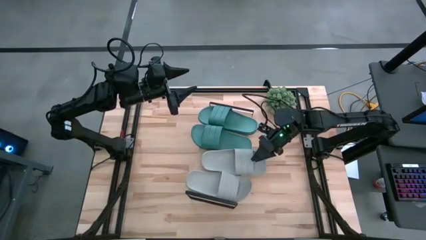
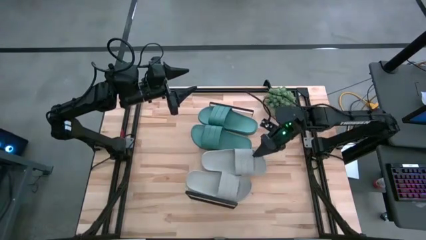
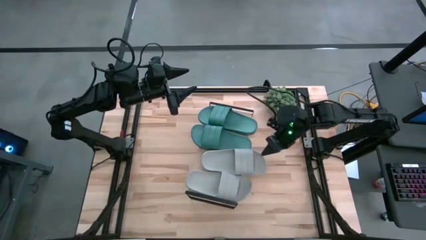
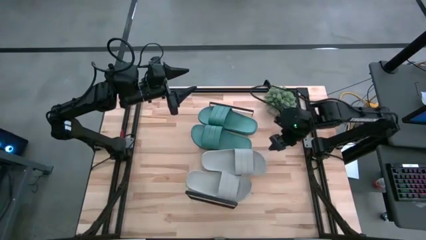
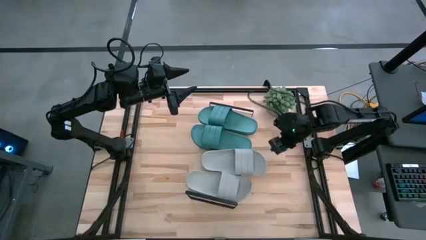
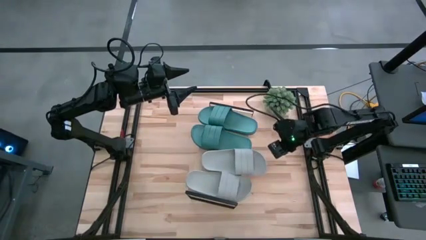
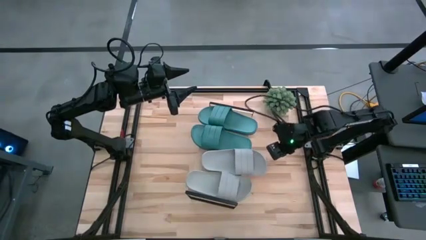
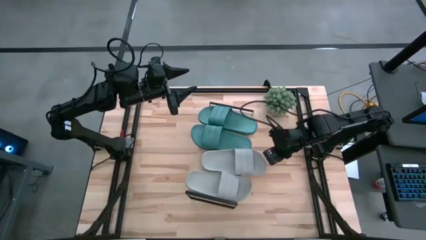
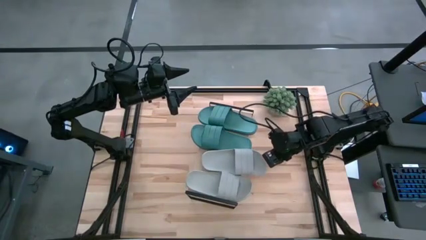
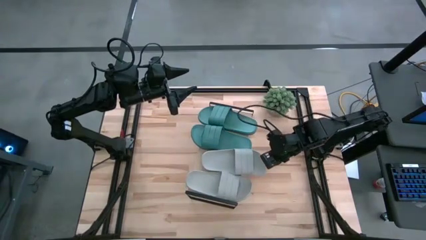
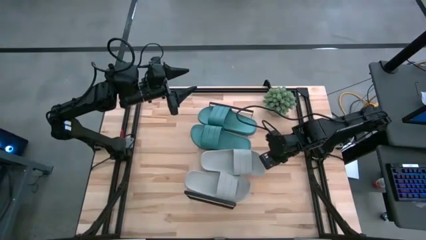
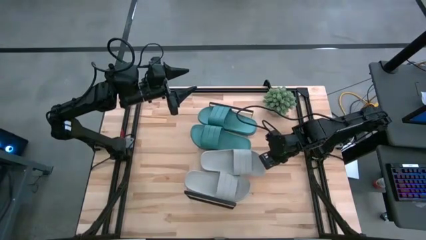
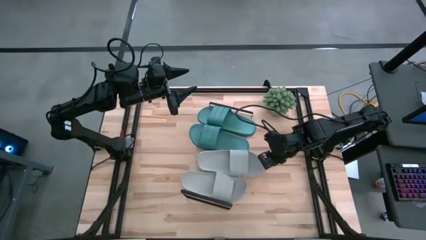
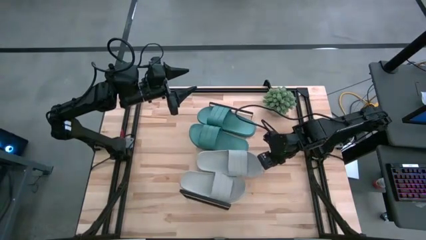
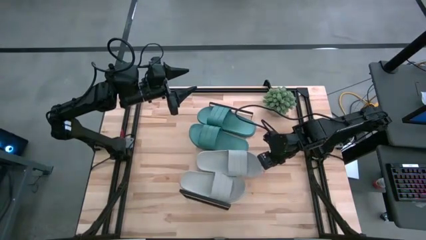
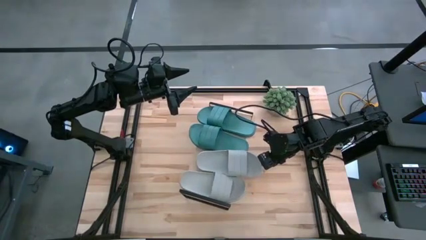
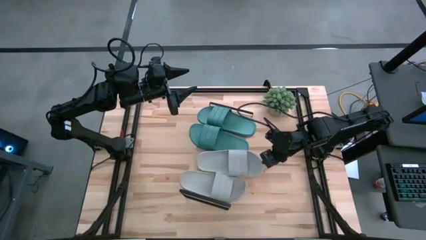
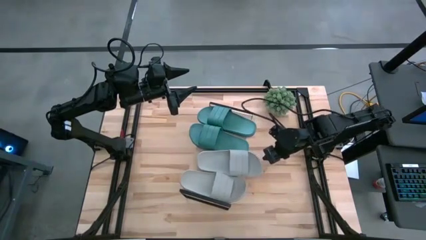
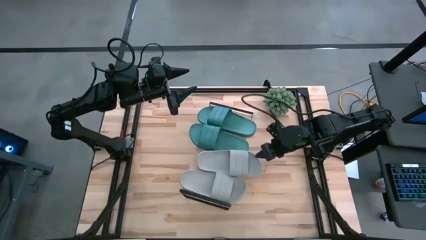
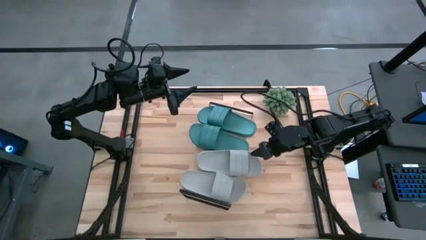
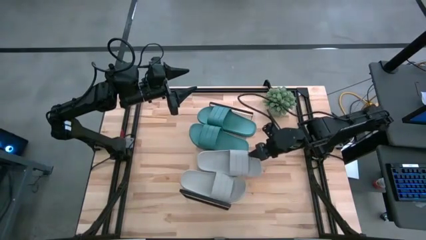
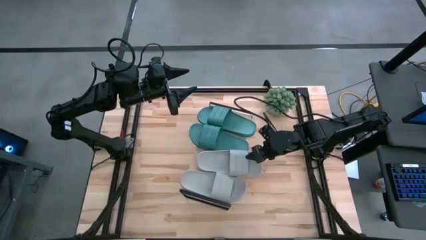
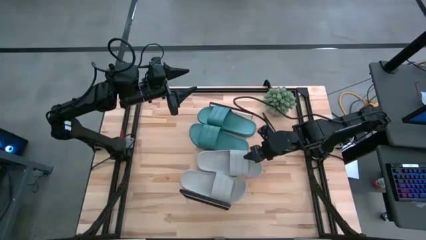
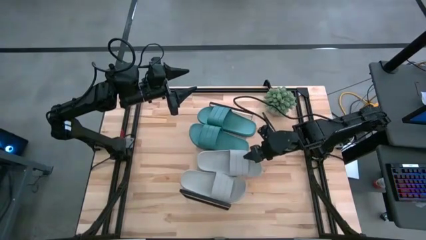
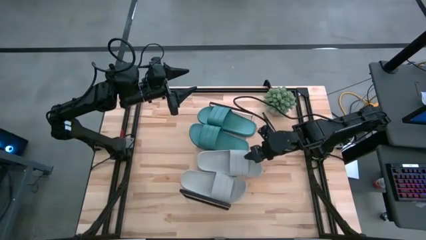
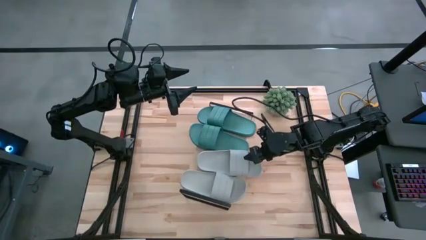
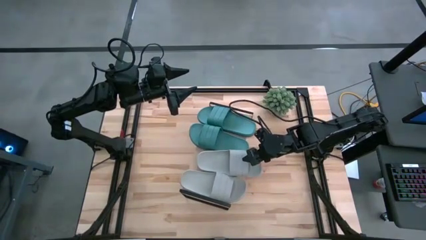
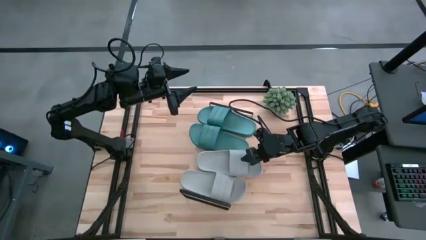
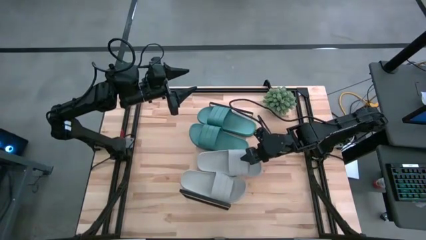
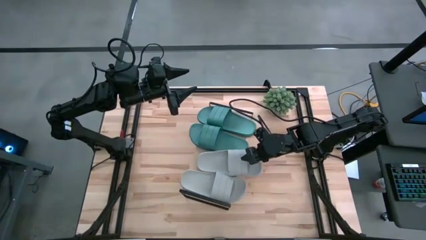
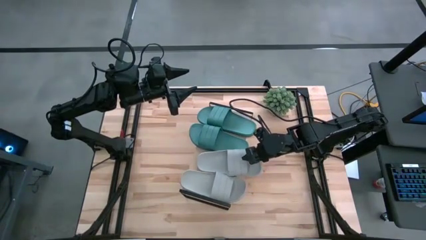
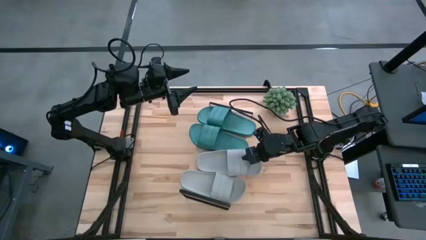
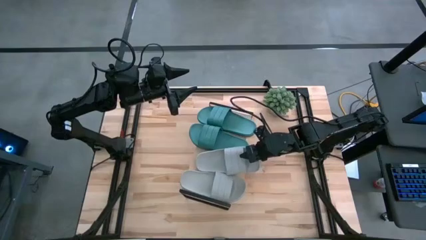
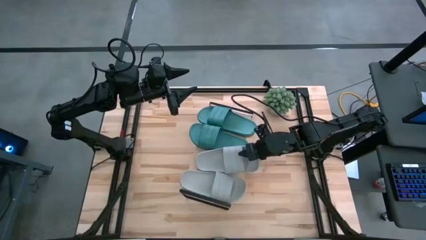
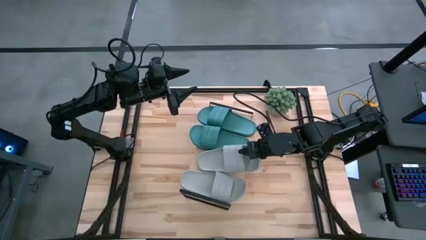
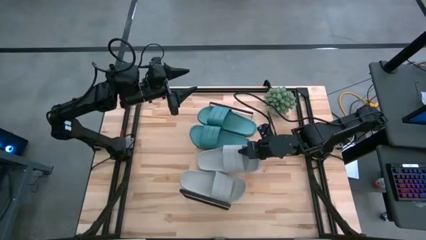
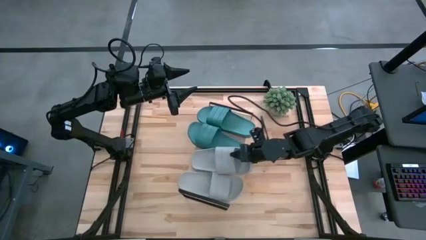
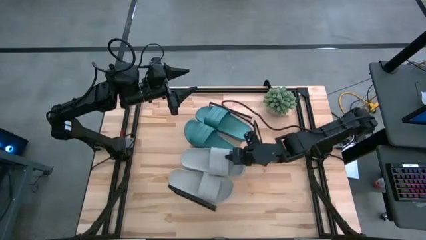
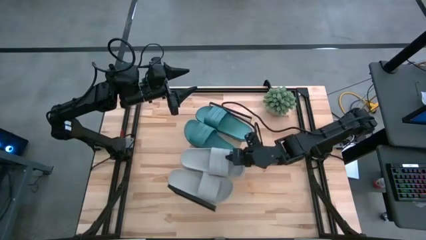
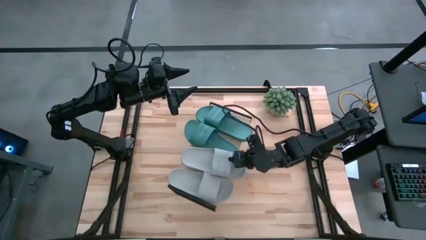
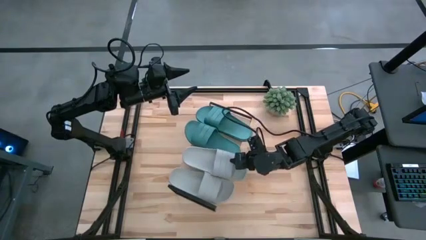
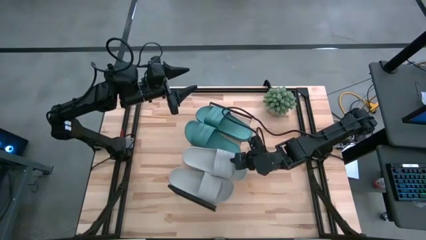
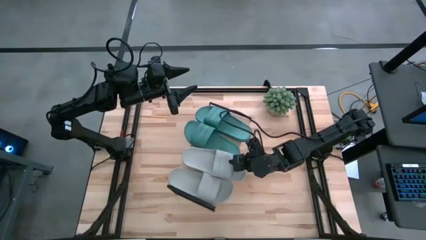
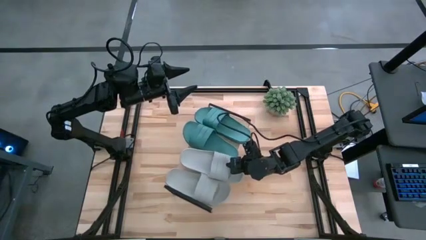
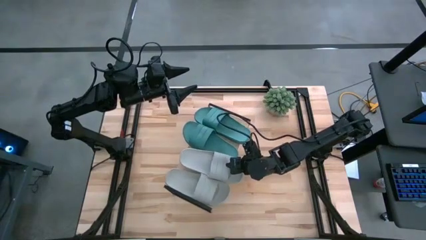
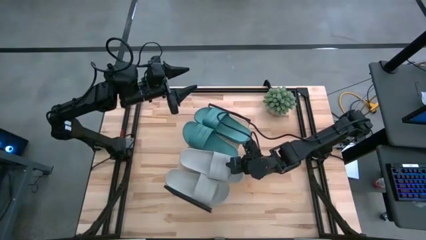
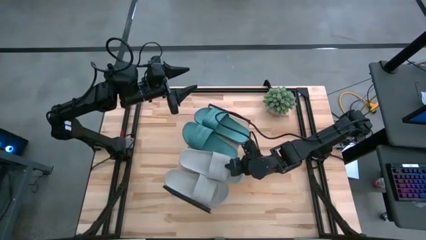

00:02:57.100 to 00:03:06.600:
Task: Pick and place slides into the shelf
Adjust the top gray slide on the shelf

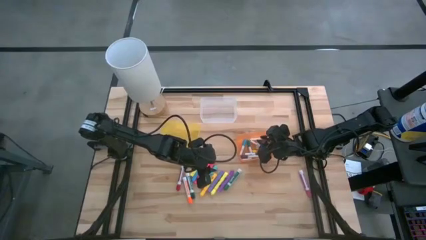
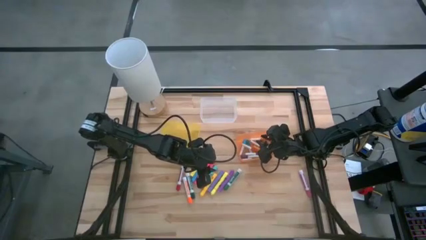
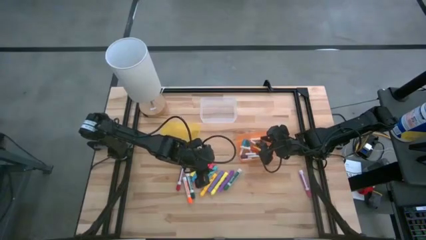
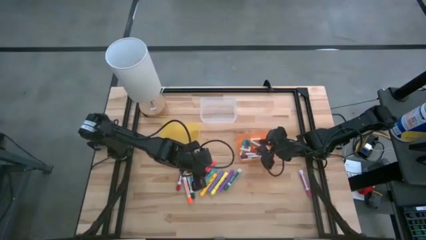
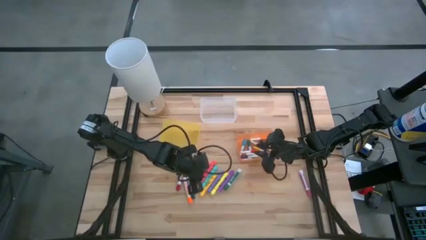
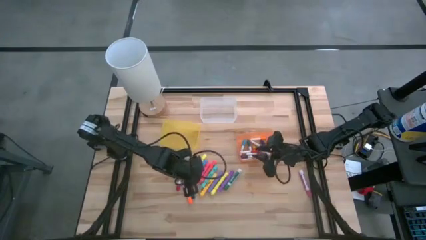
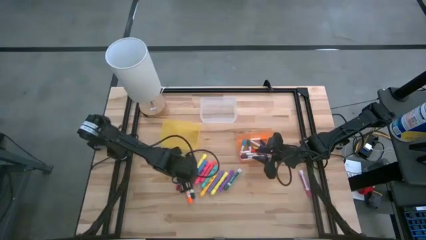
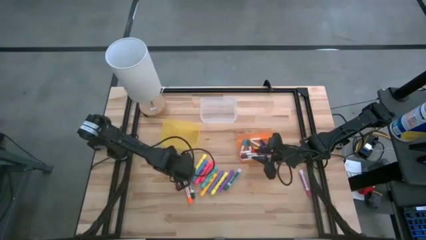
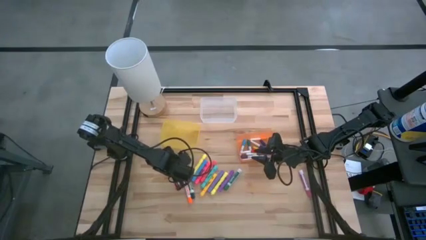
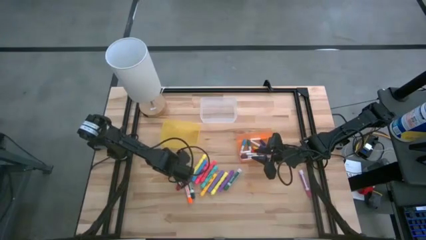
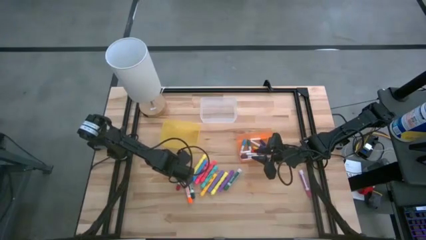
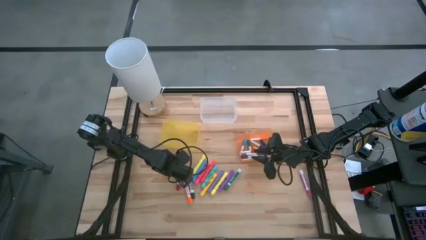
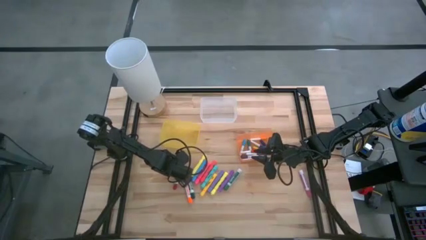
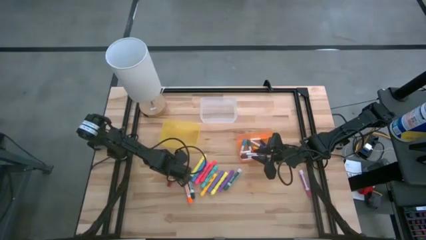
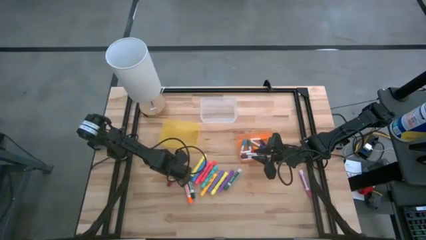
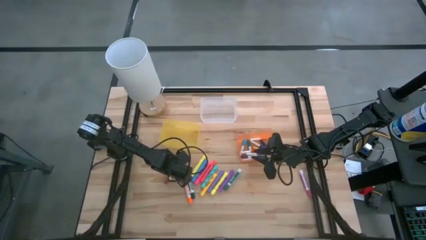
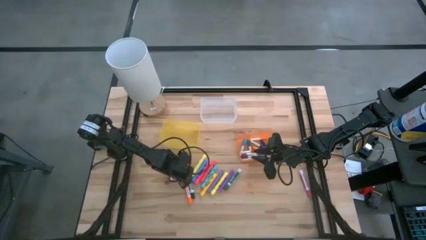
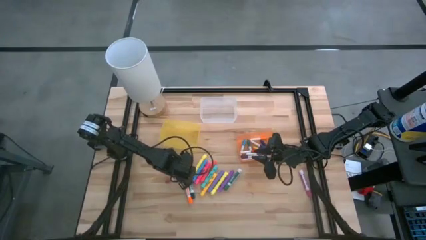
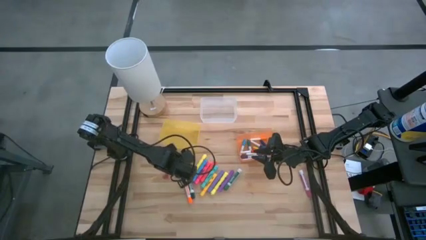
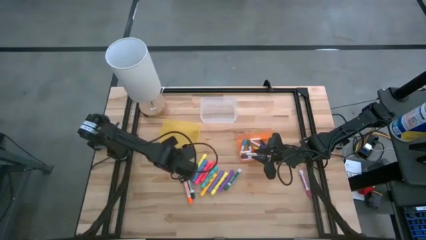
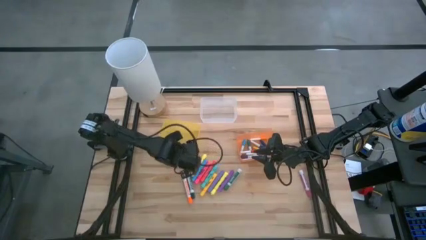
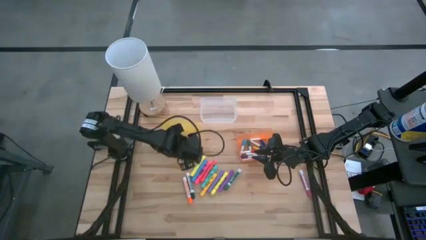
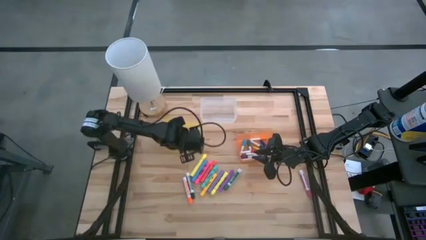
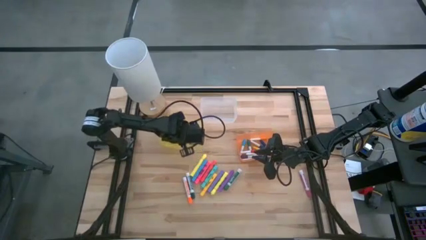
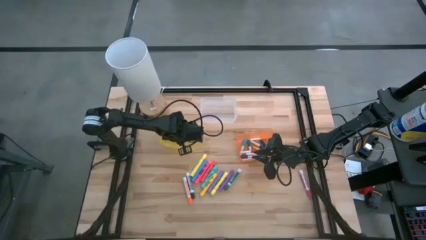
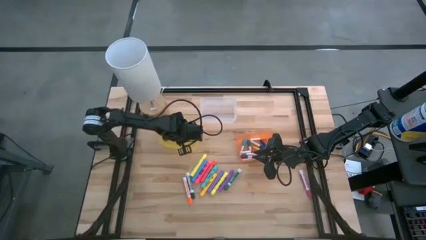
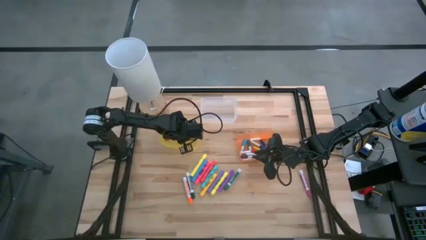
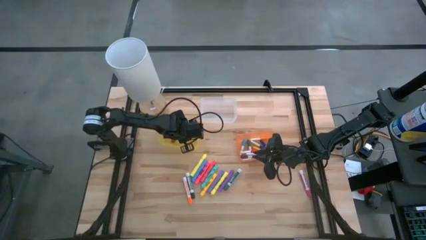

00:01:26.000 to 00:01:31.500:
Task: Pick & Place Markers
Put the maroon marker pen into the transparent yellow bin
